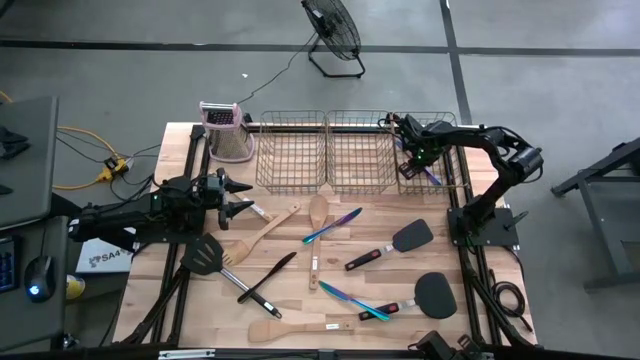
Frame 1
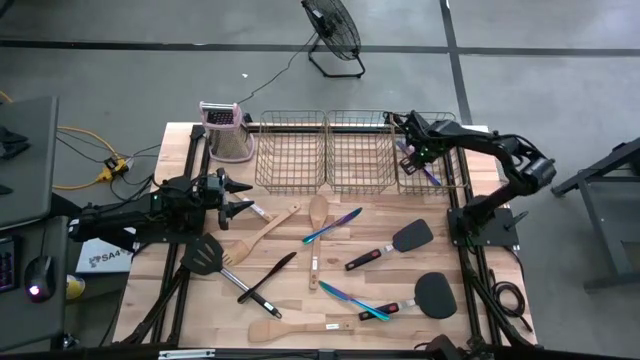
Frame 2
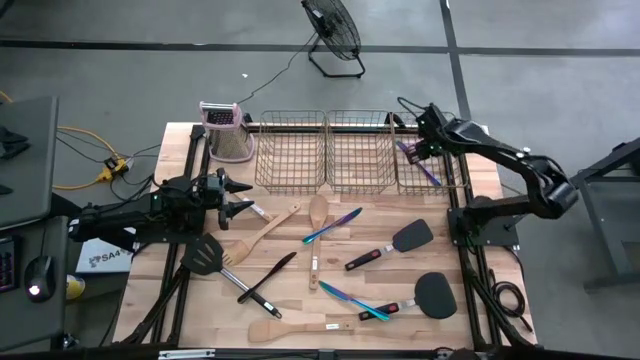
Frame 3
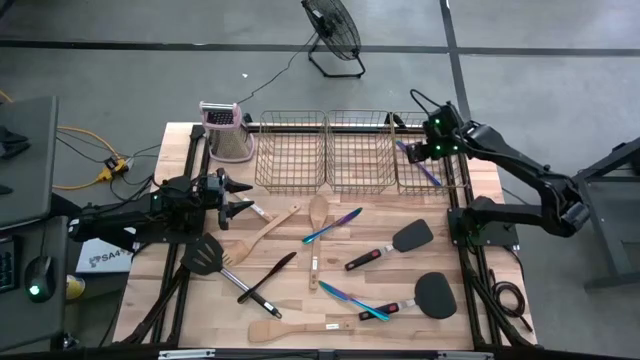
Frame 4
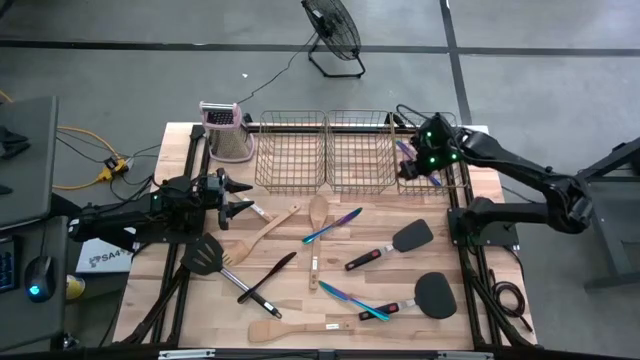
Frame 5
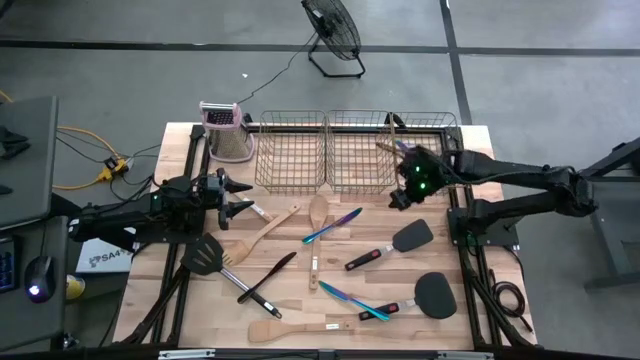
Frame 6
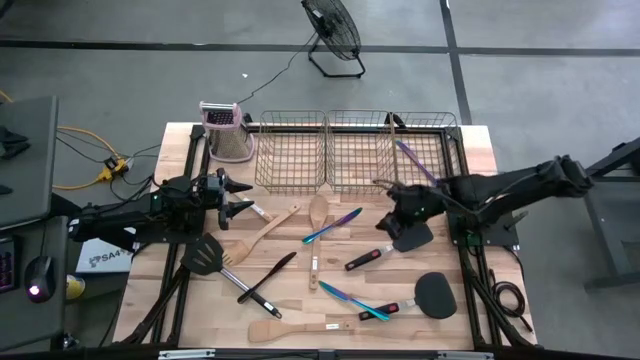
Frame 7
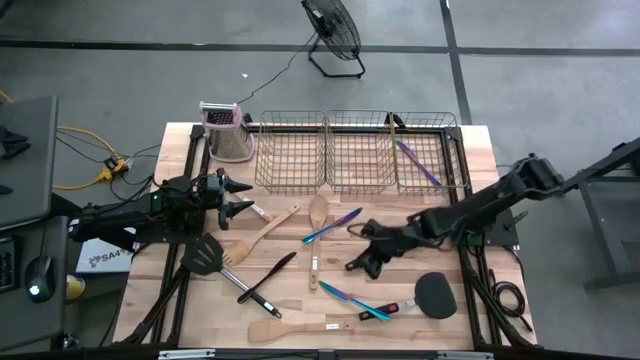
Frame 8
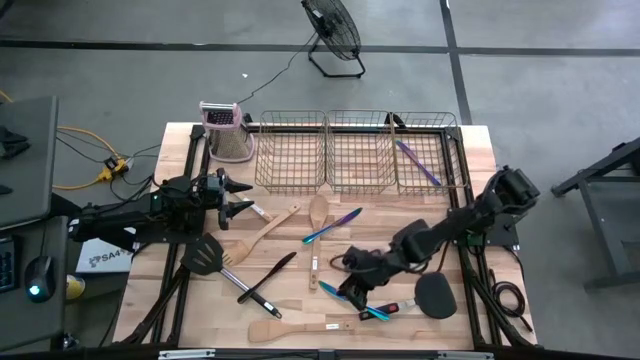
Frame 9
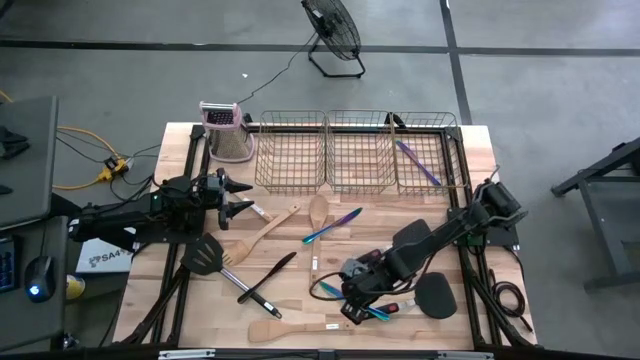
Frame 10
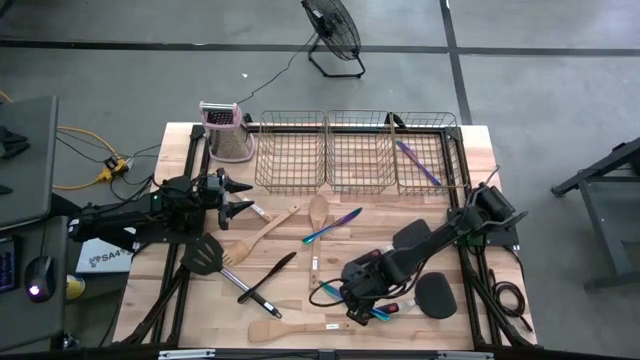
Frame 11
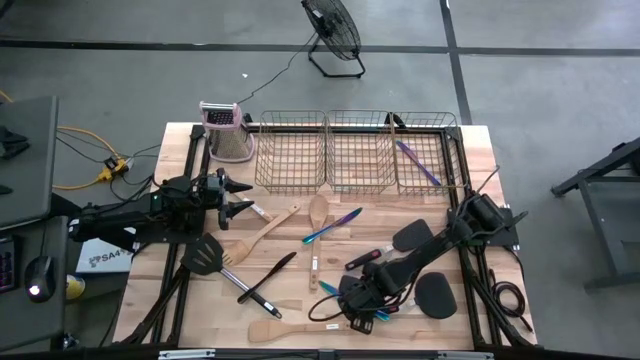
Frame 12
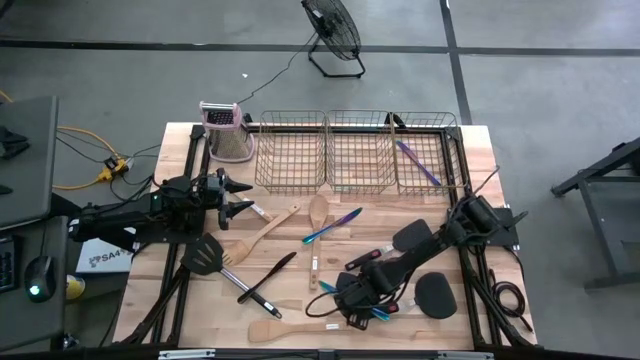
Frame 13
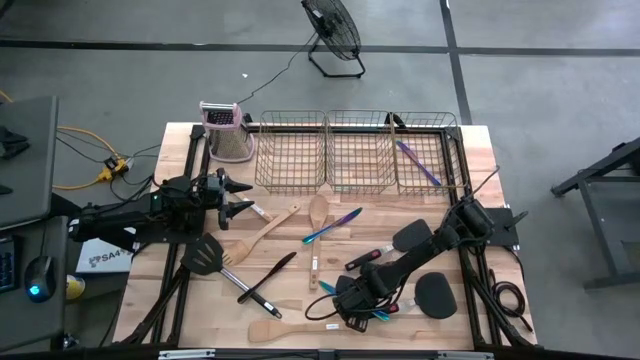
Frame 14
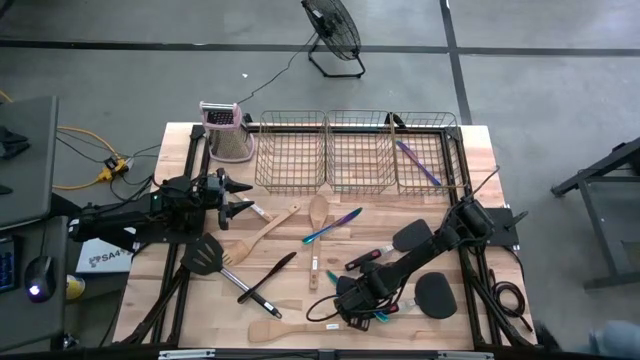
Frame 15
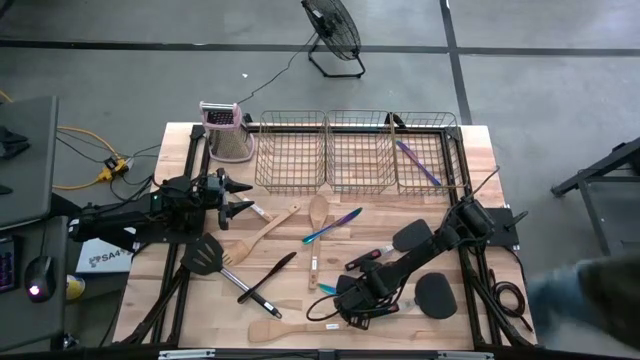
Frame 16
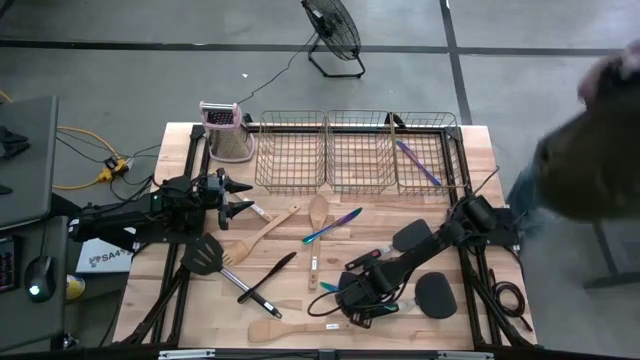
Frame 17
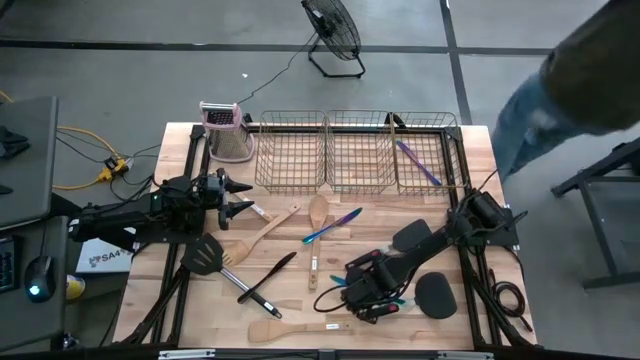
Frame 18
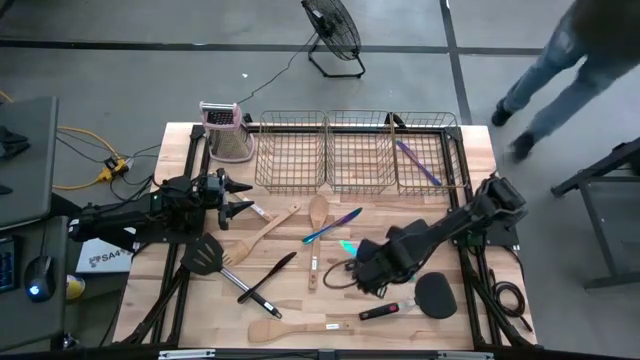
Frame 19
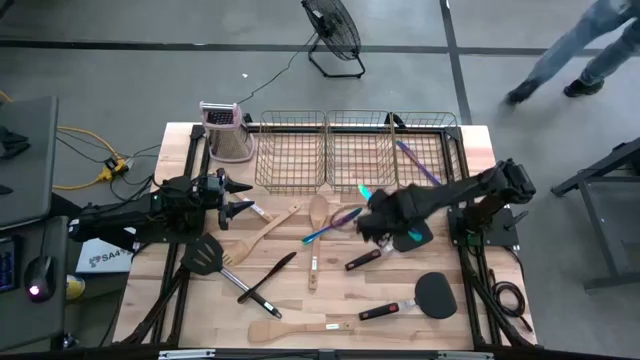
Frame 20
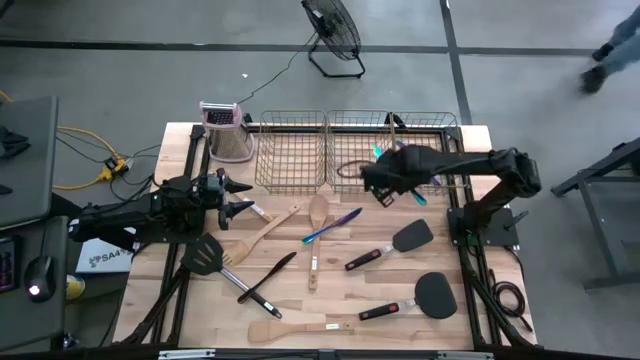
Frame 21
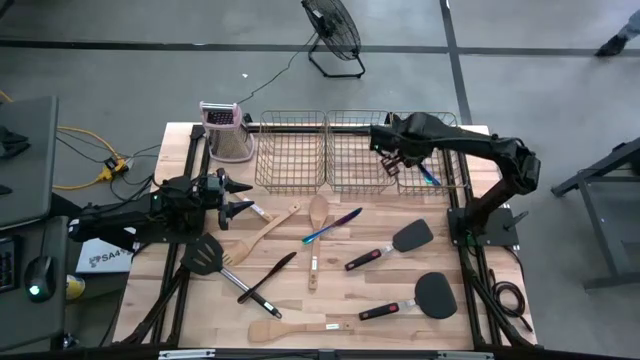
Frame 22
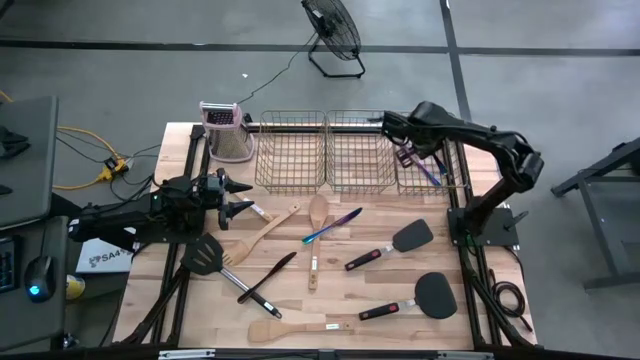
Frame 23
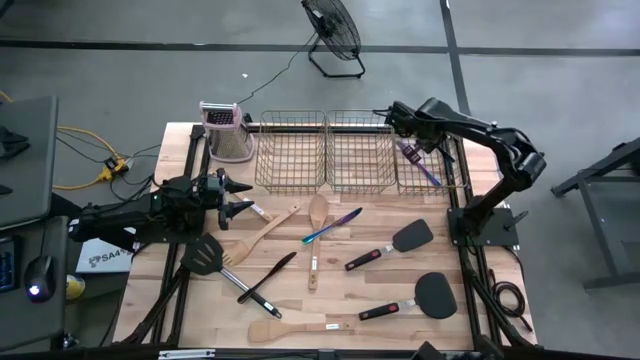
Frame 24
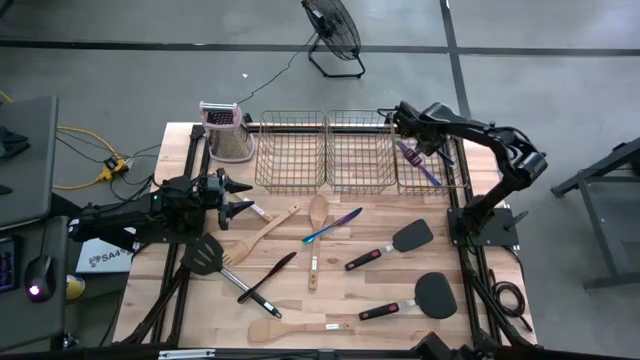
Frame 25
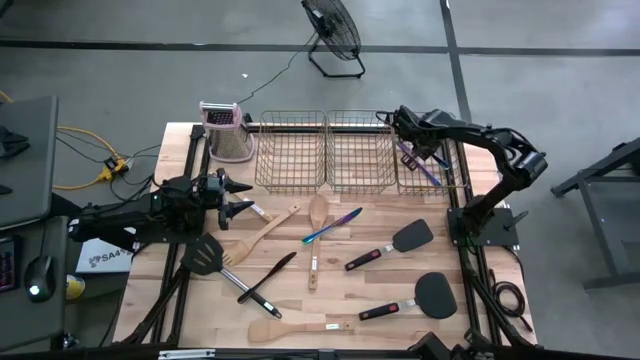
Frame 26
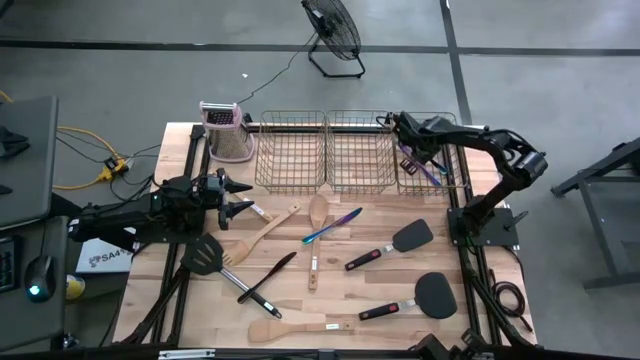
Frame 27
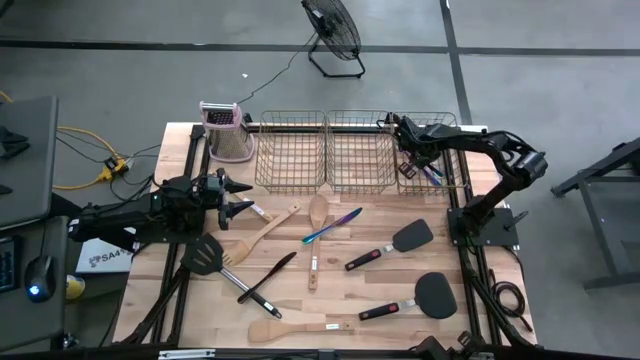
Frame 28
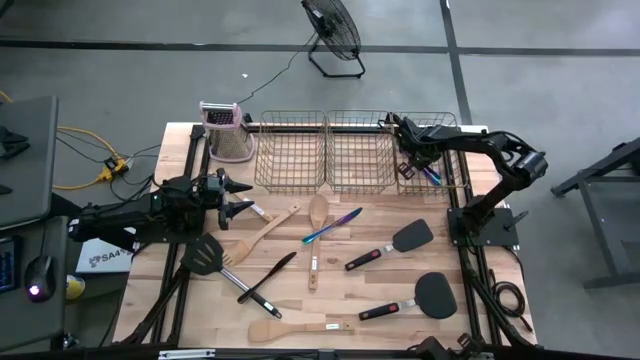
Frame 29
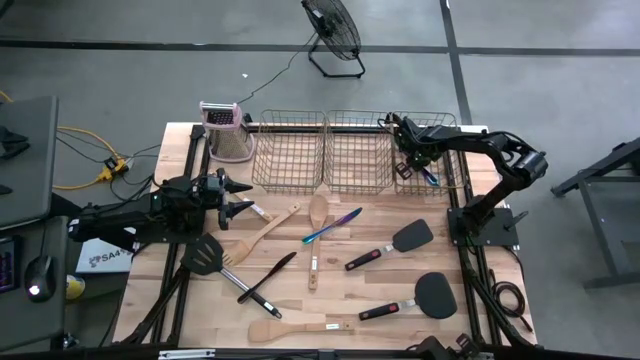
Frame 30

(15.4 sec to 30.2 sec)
Task: Pick & Place Kitchen Items
Put the bottom blue table knife into the right mesh basket

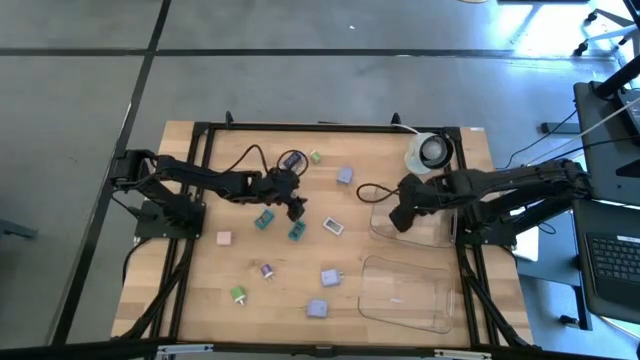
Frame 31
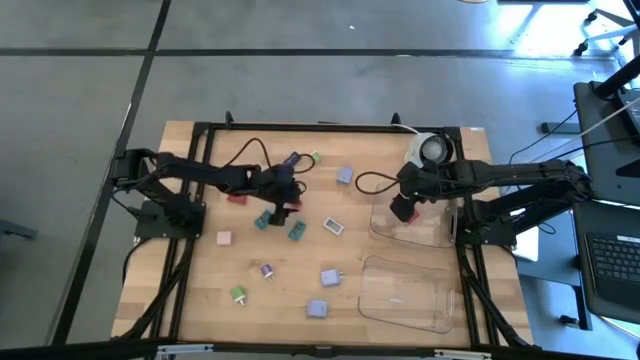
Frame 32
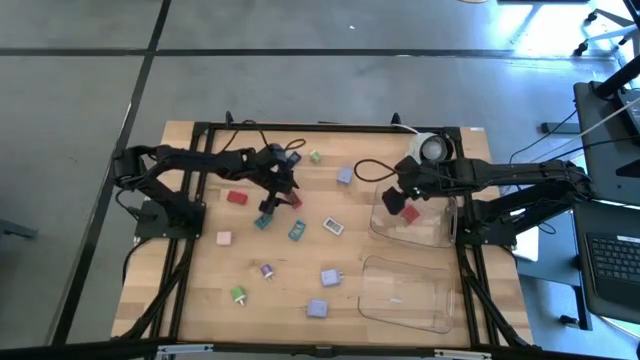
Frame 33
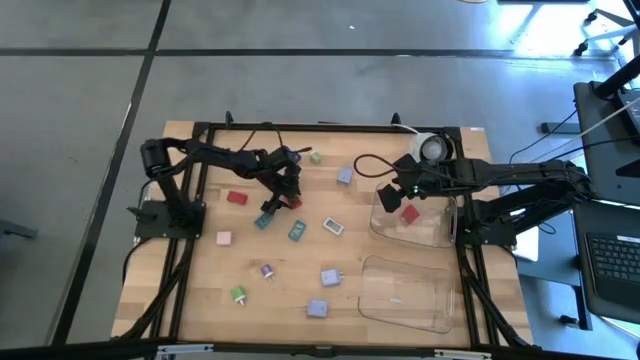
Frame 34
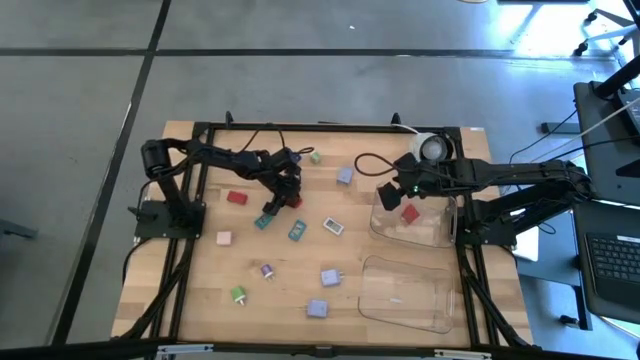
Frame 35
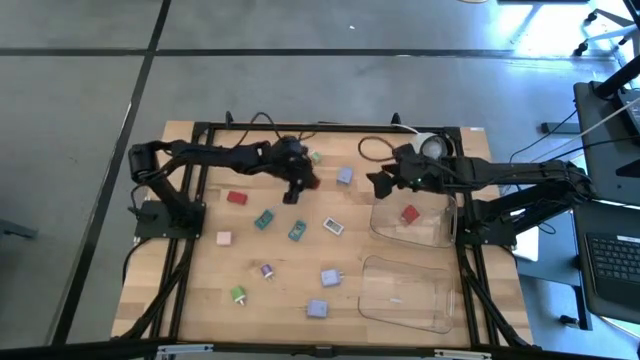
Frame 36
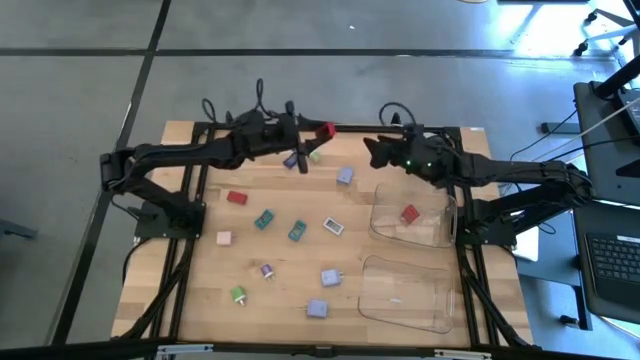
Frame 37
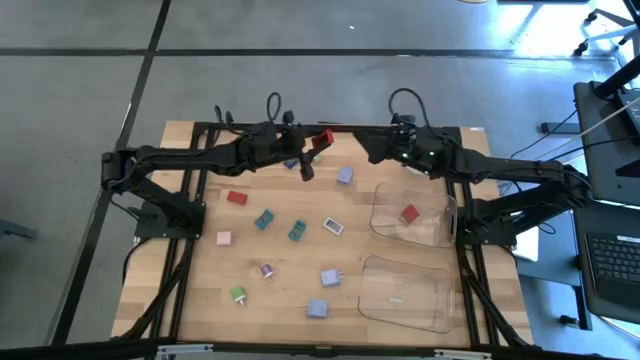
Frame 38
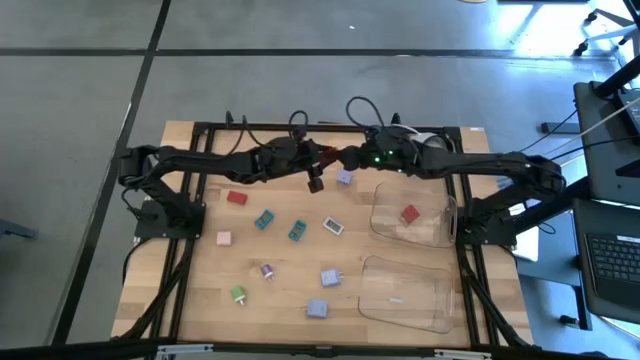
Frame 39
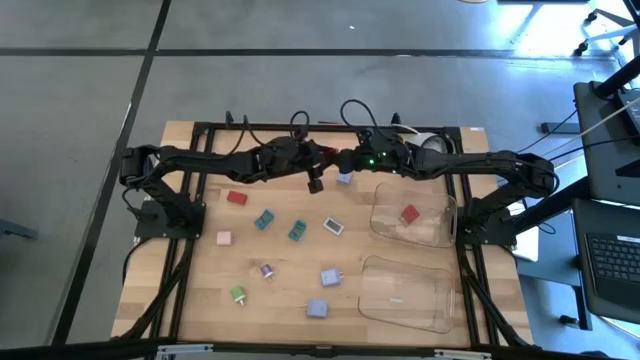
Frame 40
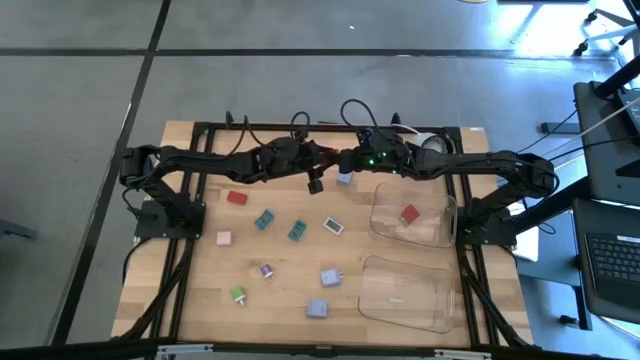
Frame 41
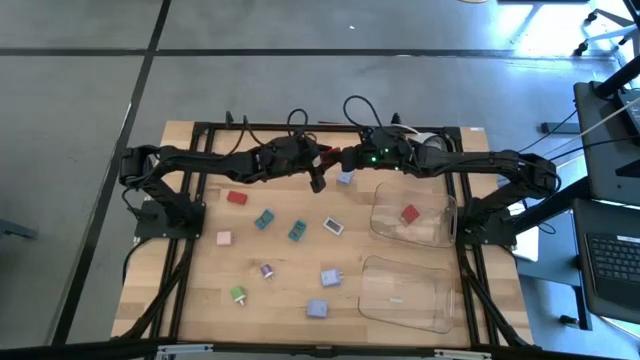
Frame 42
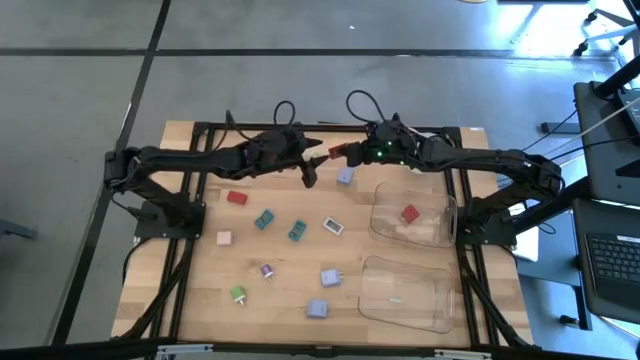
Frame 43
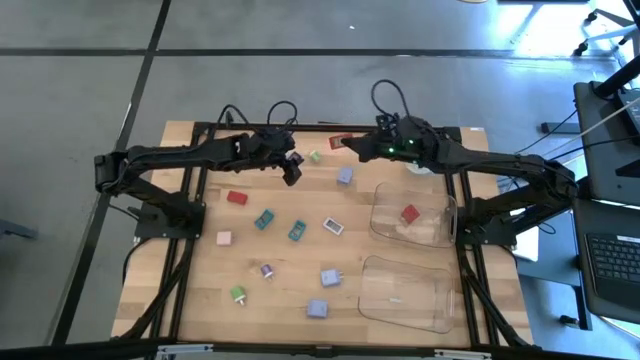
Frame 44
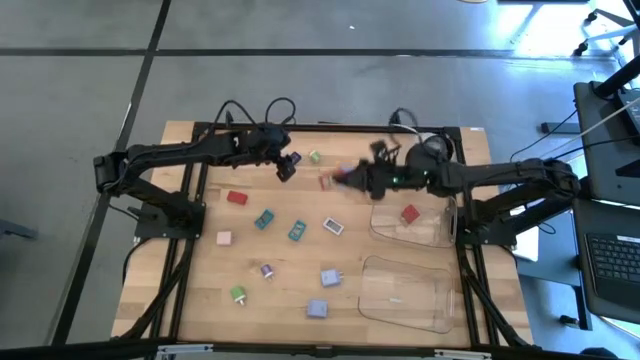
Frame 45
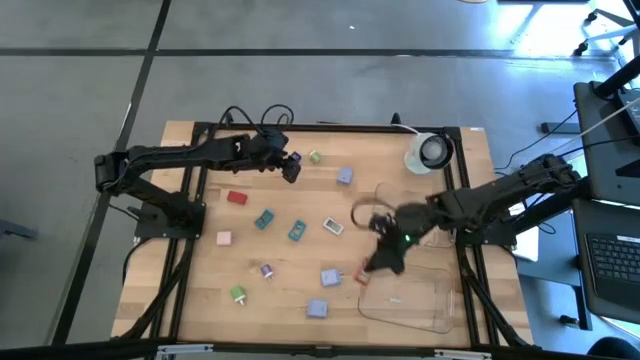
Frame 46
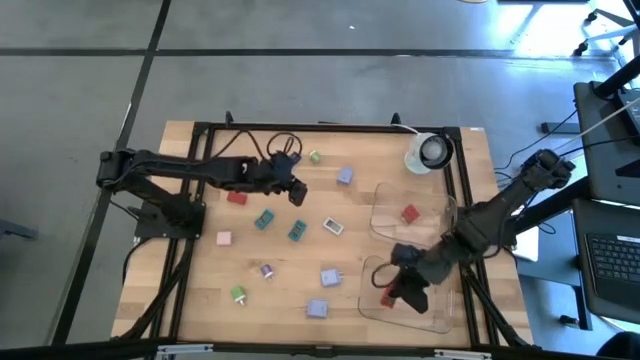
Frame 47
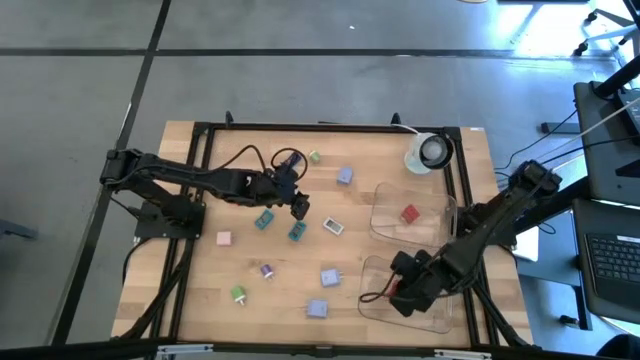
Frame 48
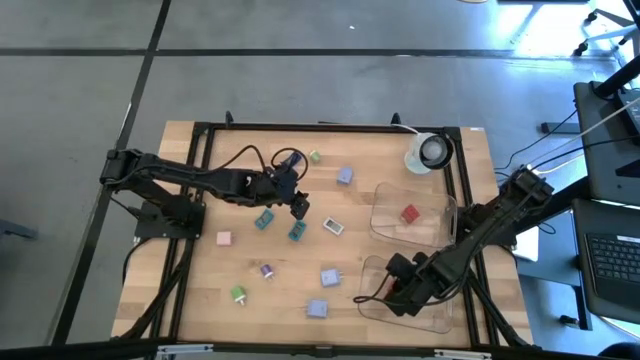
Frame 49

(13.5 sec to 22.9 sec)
Task: Pick & Place Office items
Put the right red digital timer into the bottom transparent bin
